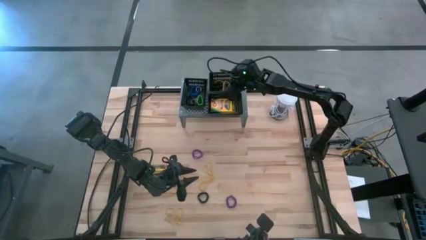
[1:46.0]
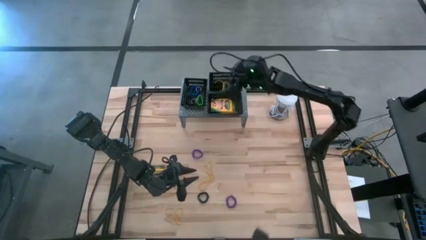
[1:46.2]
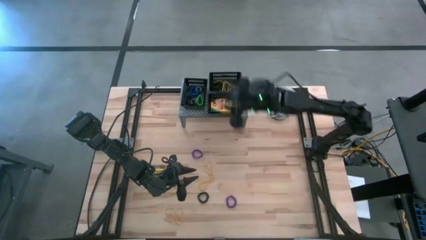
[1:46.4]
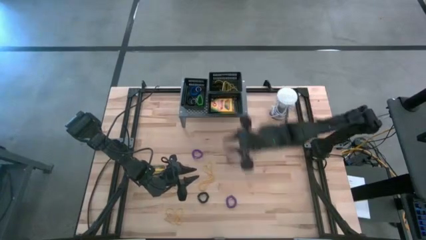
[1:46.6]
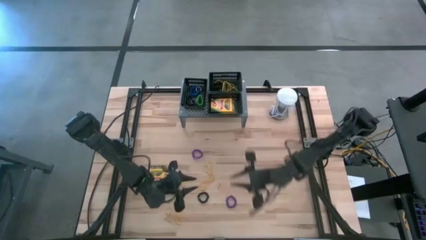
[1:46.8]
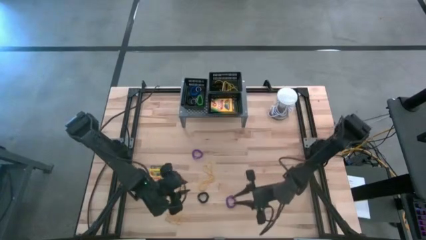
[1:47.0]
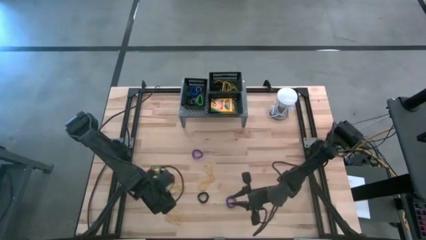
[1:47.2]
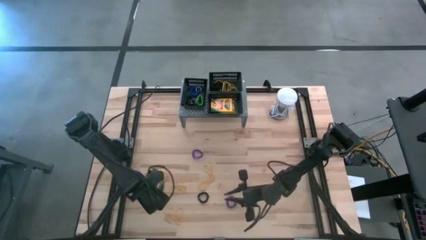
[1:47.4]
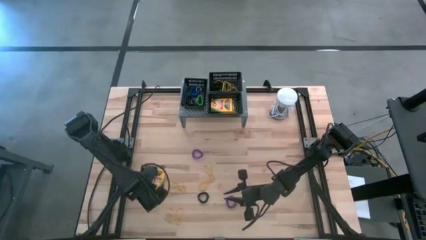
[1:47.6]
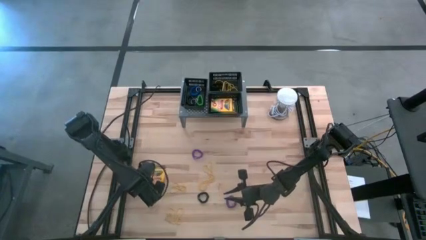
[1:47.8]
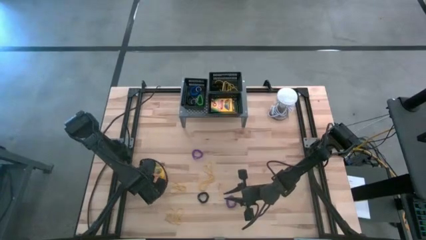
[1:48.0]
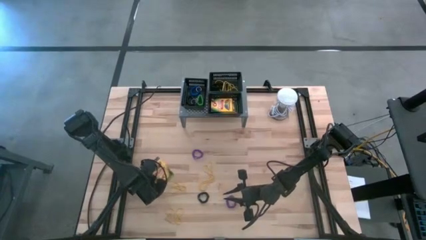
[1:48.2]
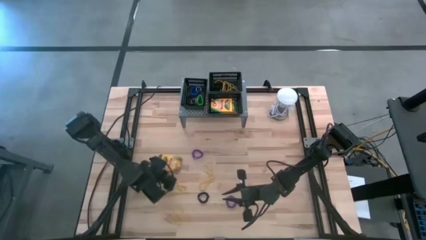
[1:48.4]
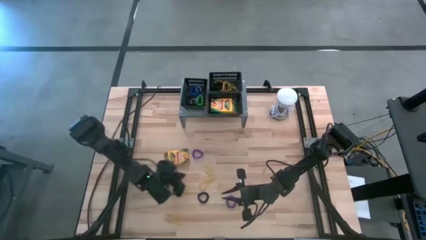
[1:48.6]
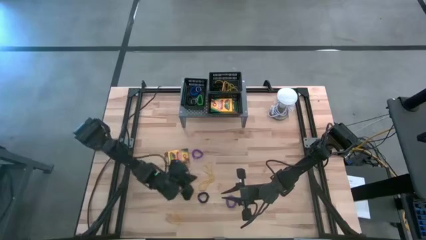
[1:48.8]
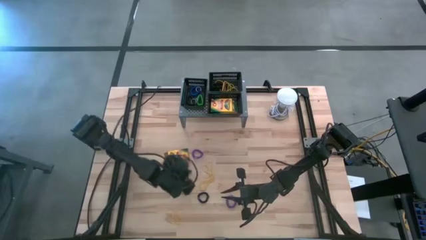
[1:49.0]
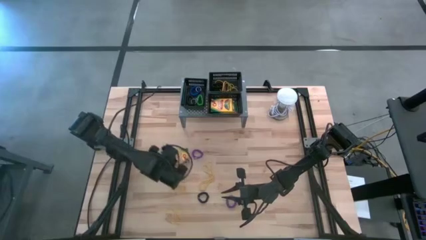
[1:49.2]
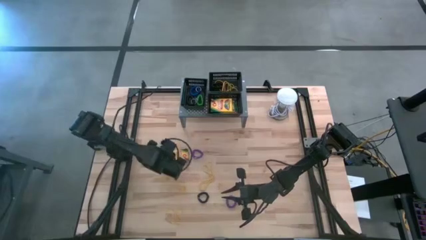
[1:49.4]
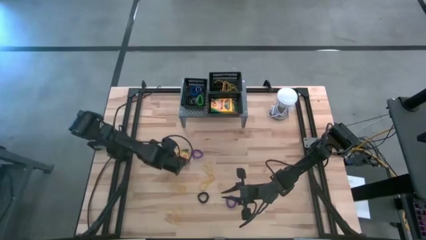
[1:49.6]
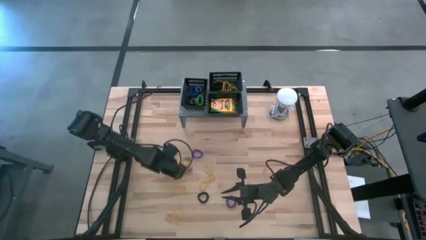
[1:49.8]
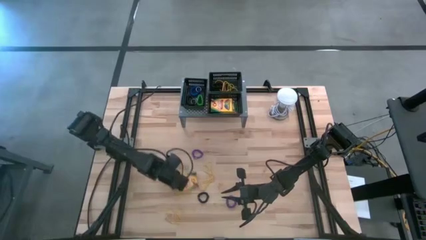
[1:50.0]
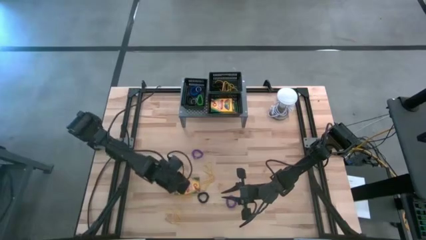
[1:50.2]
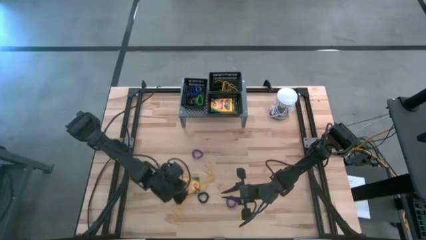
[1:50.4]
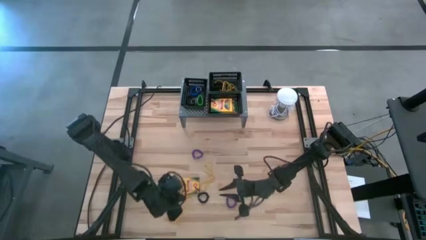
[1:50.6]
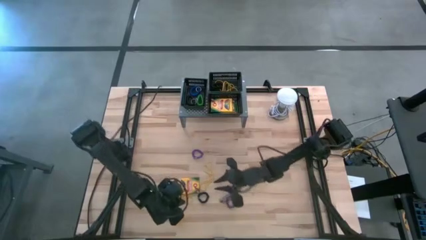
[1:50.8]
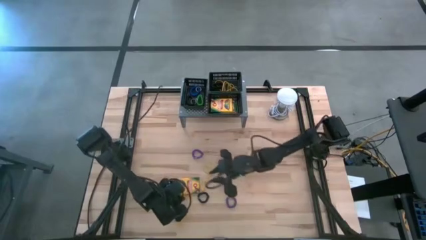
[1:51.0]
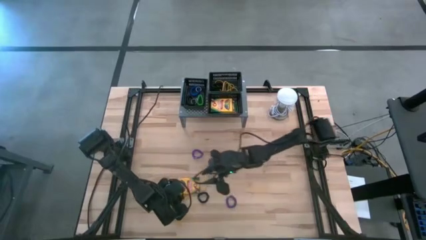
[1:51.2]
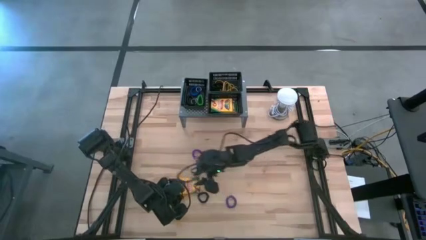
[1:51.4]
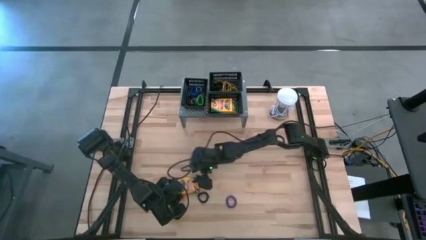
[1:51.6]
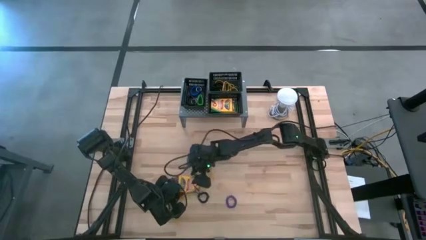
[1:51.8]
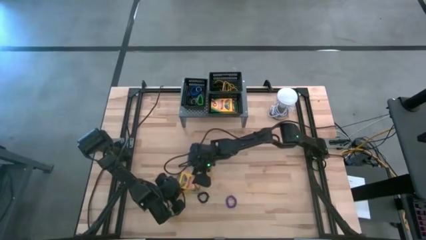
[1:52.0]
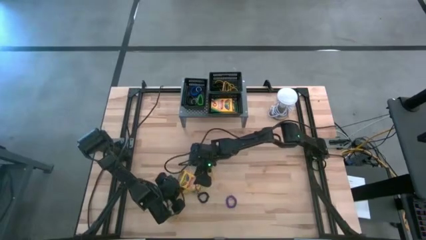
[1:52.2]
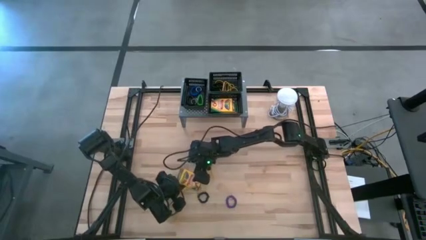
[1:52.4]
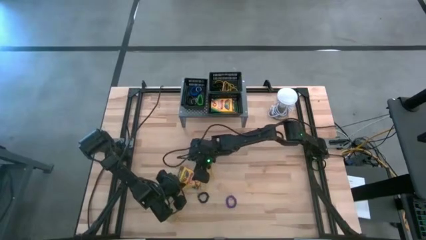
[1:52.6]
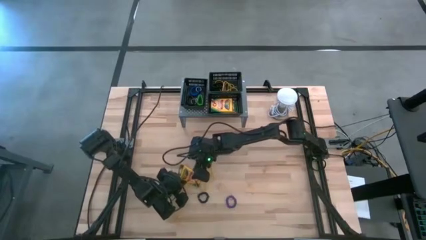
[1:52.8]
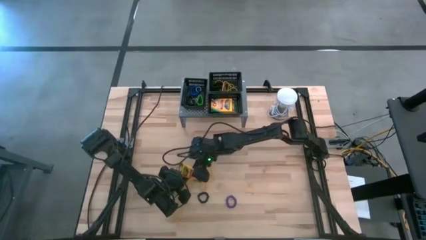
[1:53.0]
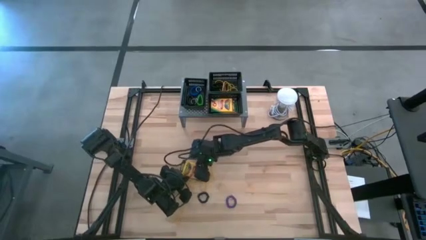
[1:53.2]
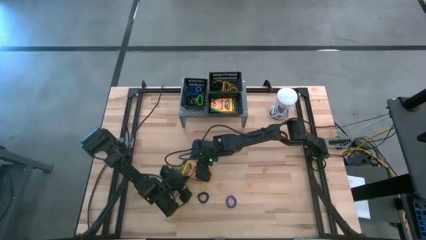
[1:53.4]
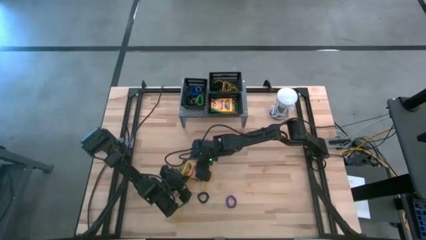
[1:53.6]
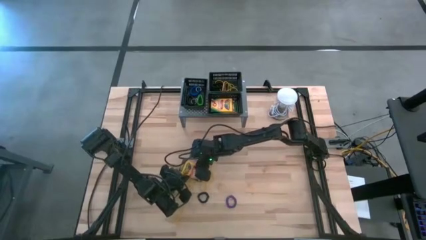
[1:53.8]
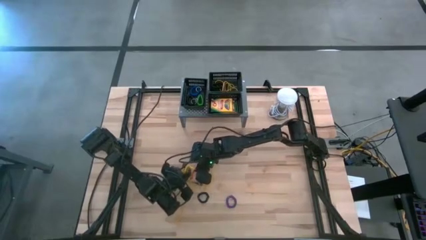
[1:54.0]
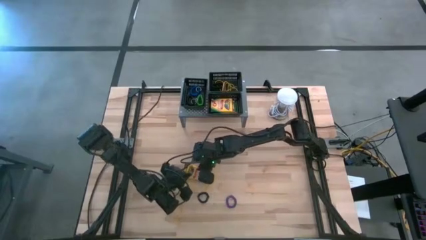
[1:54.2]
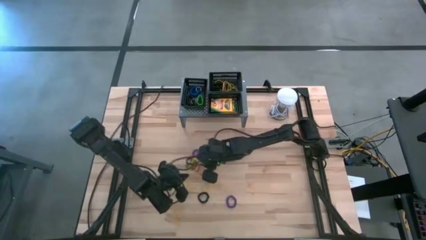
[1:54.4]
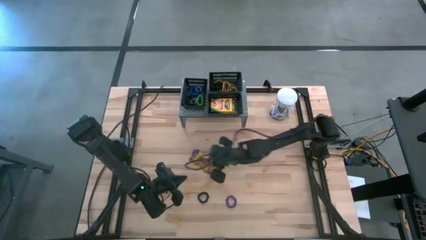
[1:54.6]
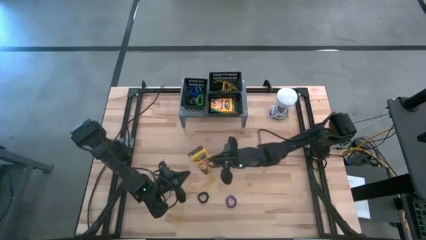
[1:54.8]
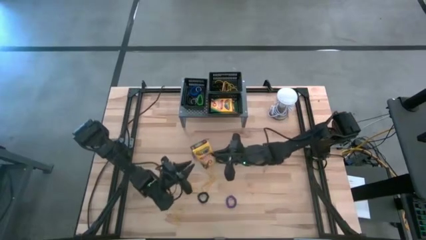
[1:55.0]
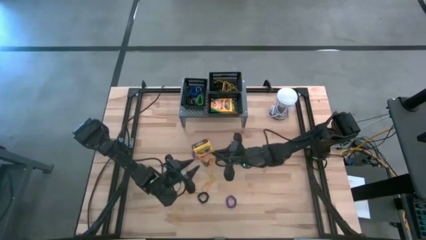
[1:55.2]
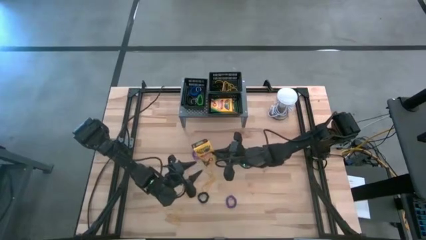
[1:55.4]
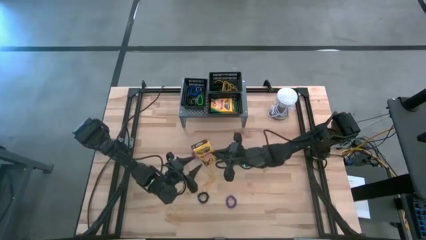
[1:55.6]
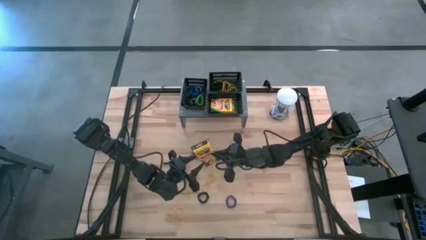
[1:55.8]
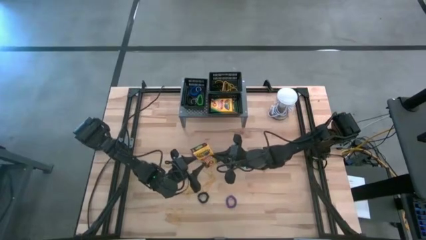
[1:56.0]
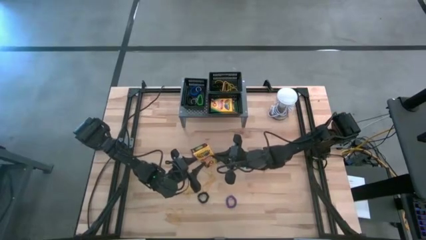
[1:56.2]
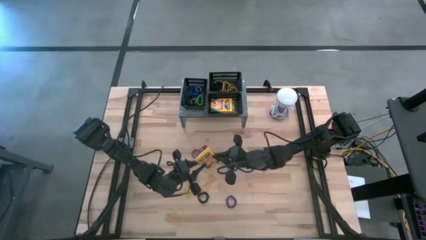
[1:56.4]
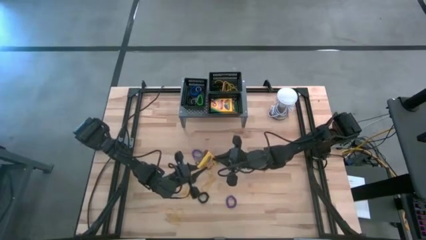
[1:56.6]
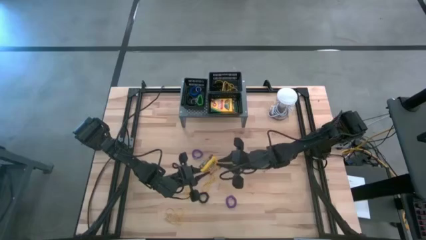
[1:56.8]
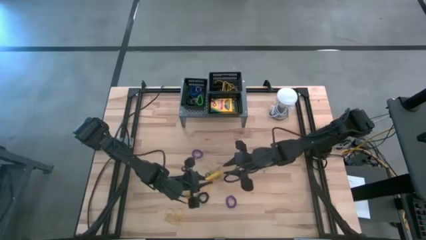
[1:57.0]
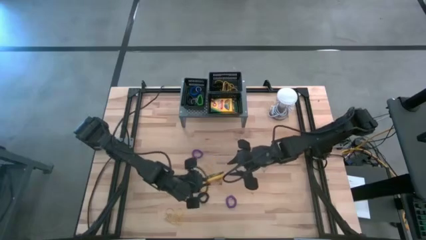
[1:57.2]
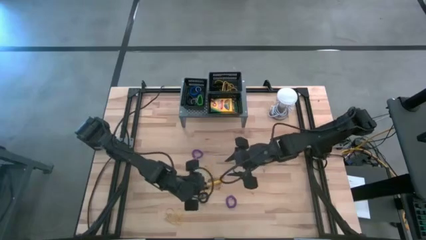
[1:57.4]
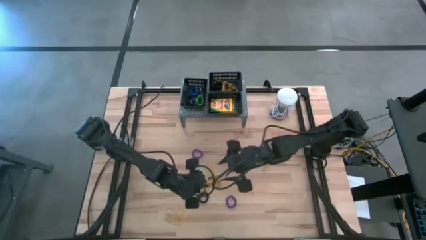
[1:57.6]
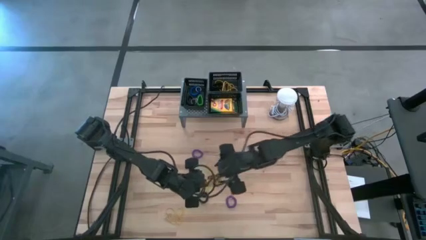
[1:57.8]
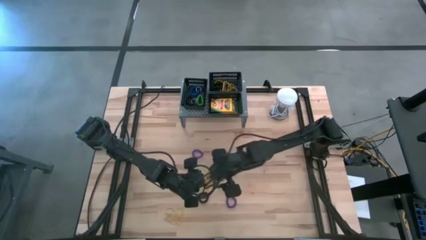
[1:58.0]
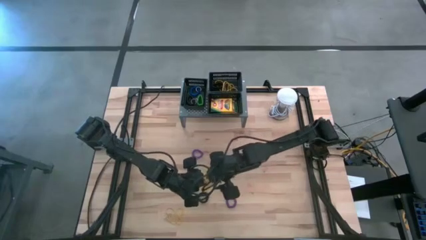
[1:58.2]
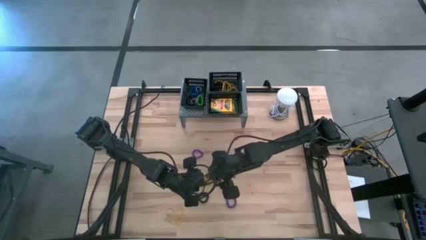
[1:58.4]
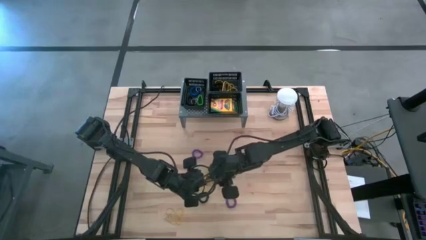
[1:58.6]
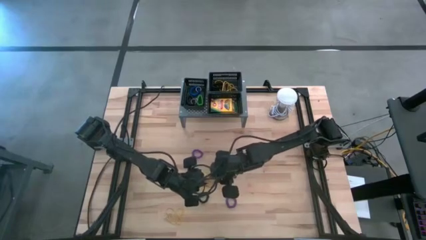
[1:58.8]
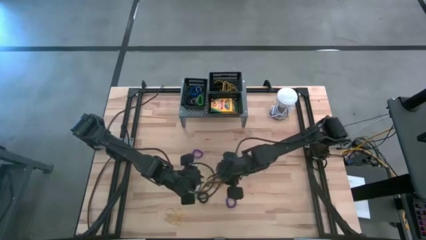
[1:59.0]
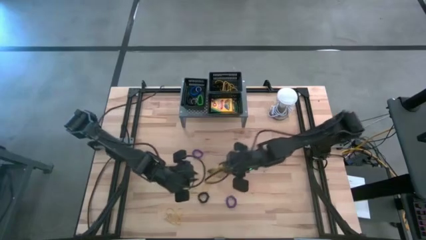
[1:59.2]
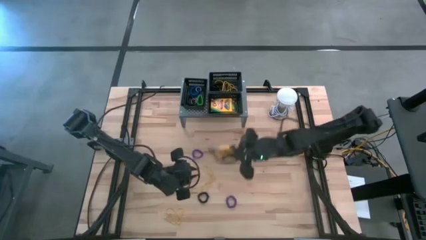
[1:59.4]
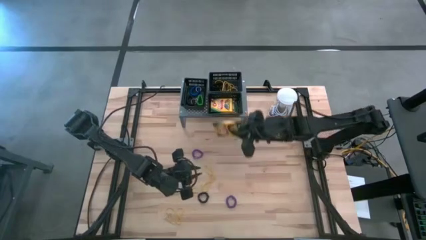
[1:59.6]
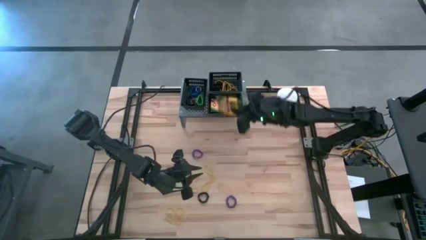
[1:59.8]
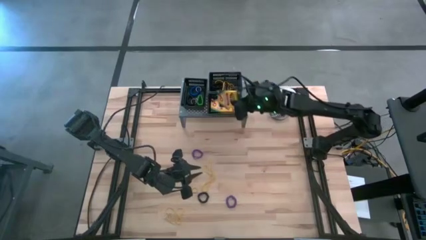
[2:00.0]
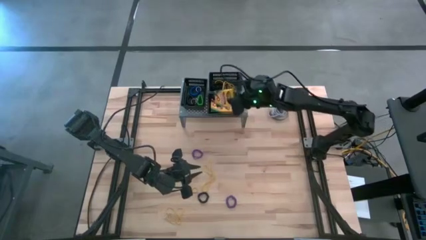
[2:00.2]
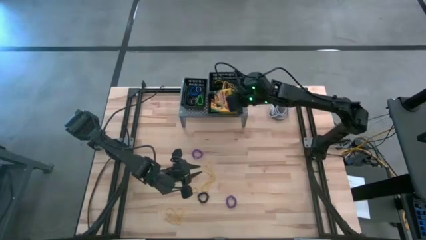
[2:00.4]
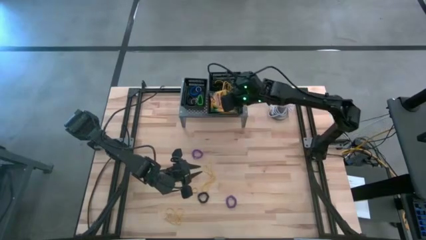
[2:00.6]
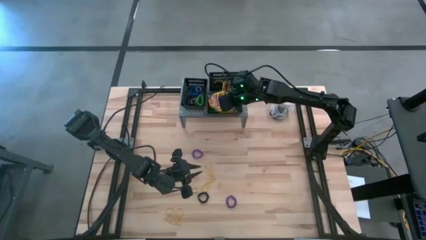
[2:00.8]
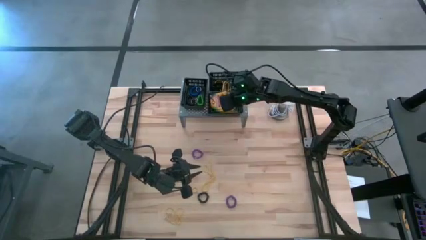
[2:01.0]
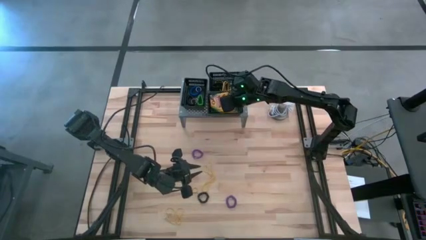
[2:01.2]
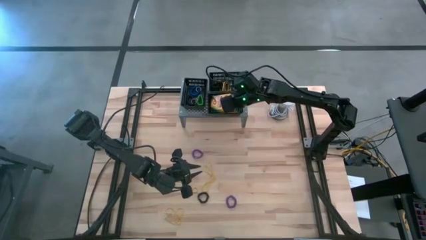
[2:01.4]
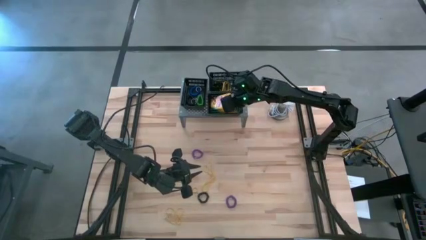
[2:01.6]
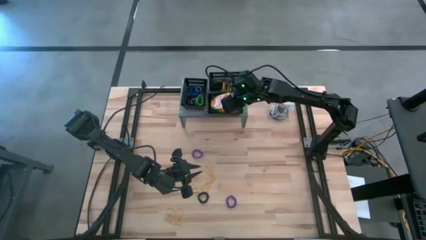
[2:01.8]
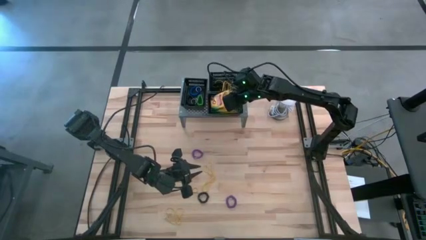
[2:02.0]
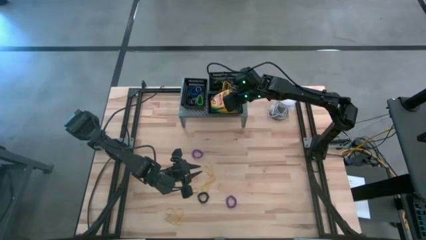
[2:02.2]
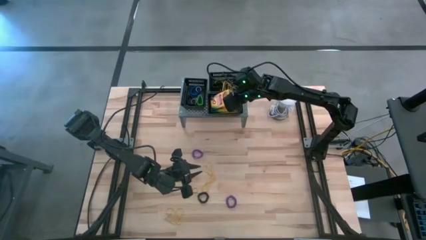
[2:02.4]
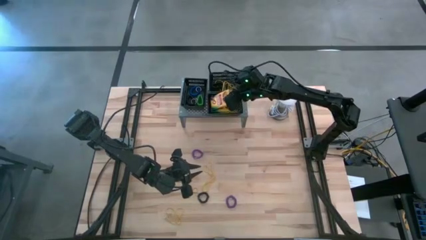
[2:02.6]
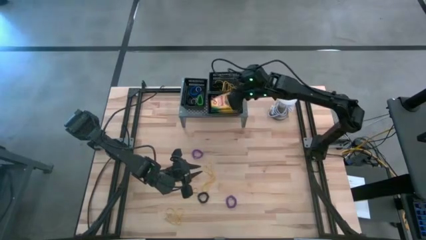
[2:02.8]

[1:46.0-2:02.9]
Task: Pick & Place Office Desk Supplies
Put the crayon box into the bottom black bin on the shelf
